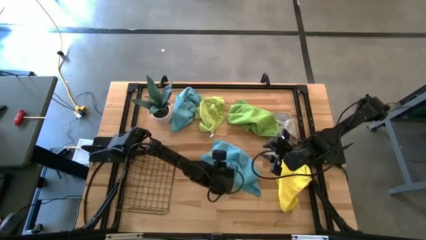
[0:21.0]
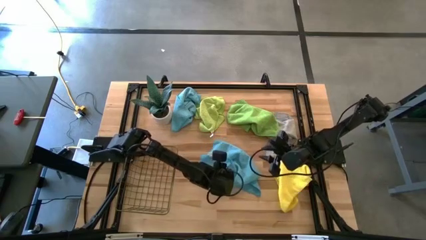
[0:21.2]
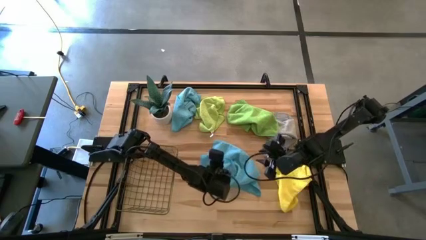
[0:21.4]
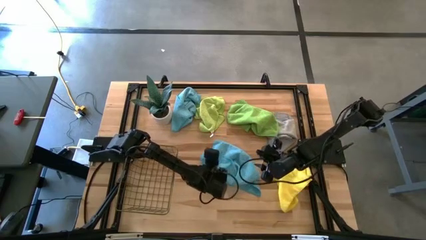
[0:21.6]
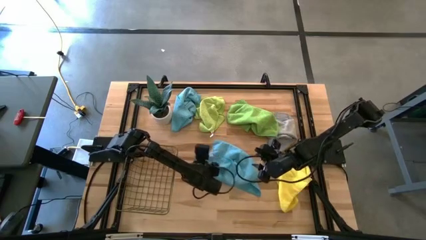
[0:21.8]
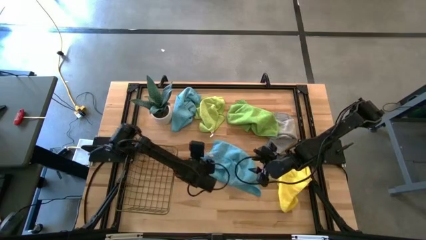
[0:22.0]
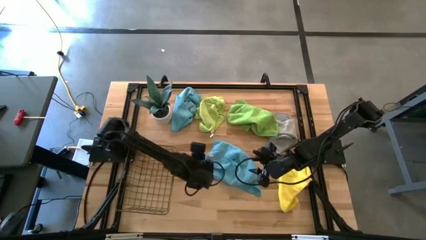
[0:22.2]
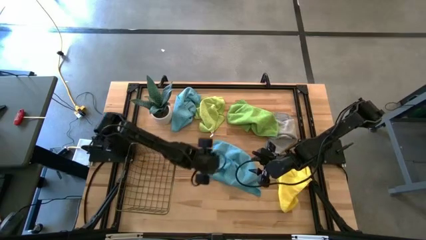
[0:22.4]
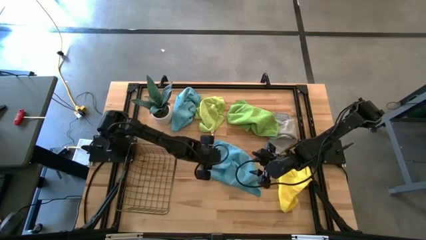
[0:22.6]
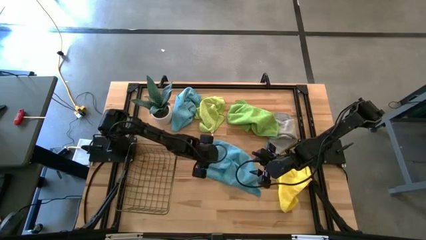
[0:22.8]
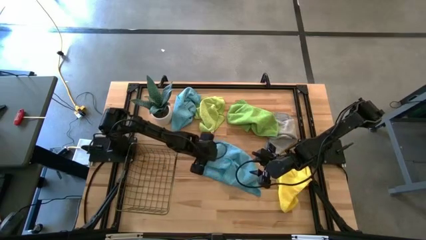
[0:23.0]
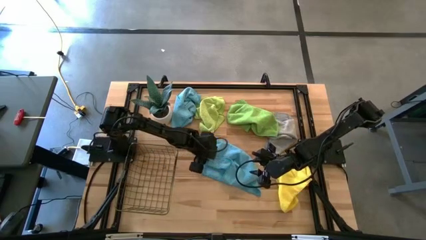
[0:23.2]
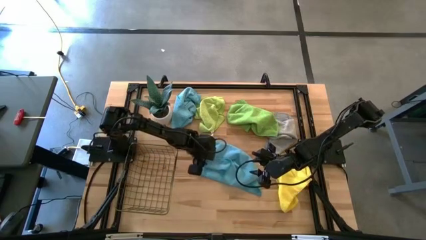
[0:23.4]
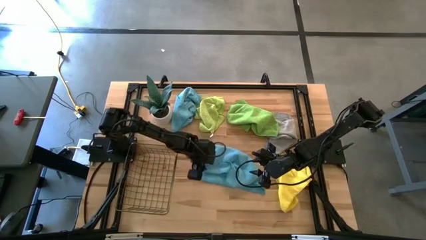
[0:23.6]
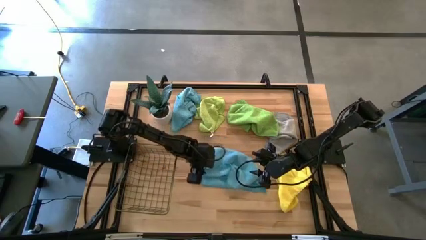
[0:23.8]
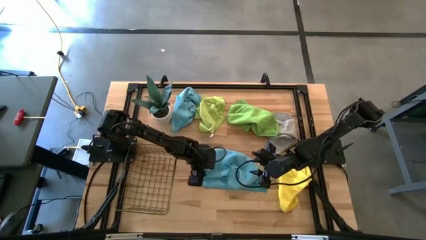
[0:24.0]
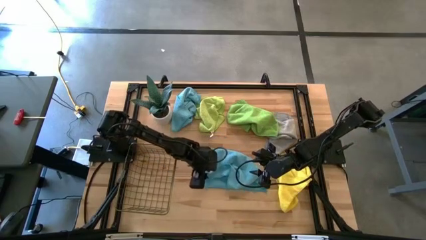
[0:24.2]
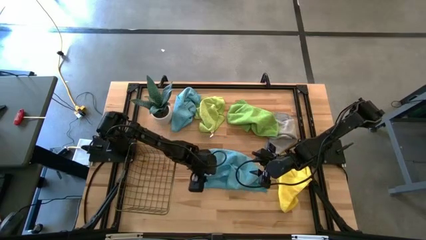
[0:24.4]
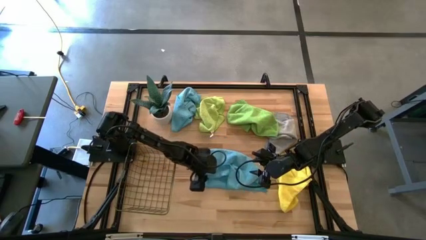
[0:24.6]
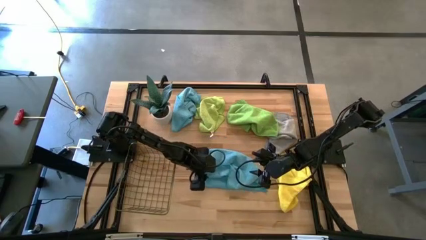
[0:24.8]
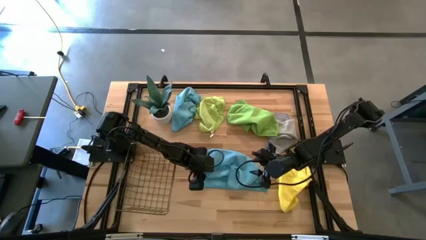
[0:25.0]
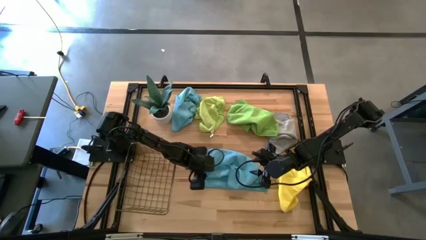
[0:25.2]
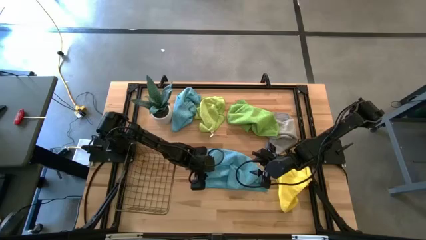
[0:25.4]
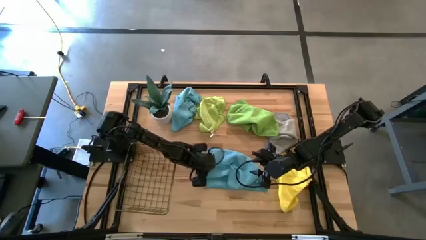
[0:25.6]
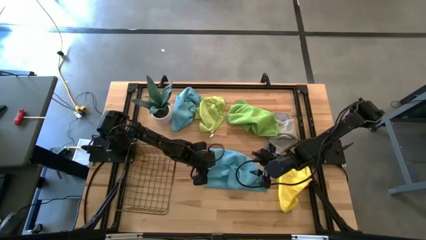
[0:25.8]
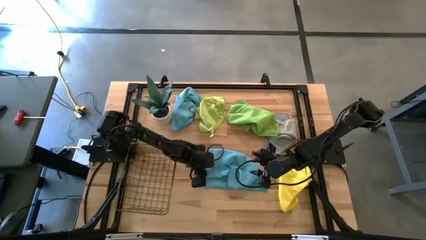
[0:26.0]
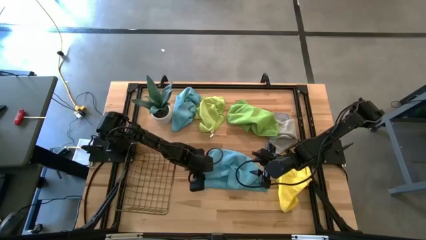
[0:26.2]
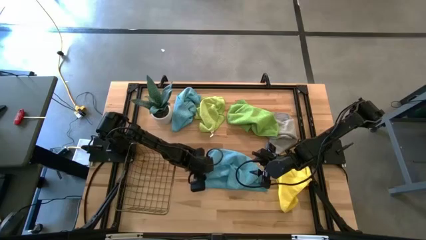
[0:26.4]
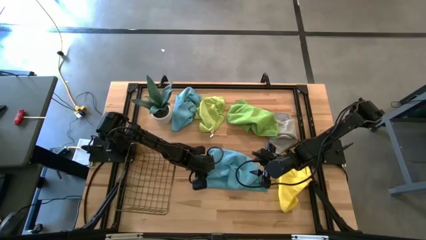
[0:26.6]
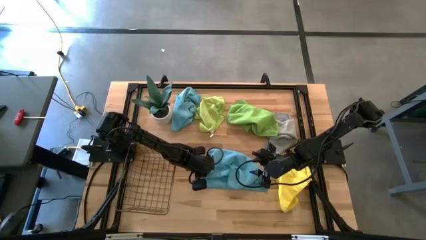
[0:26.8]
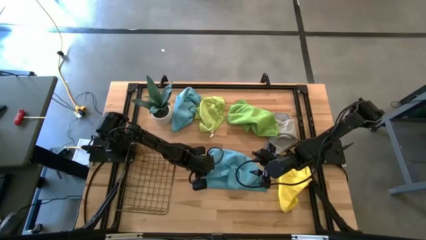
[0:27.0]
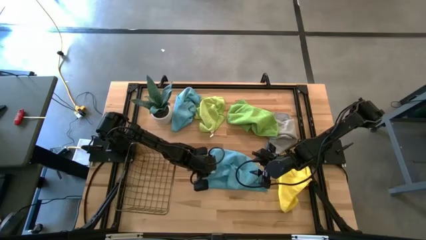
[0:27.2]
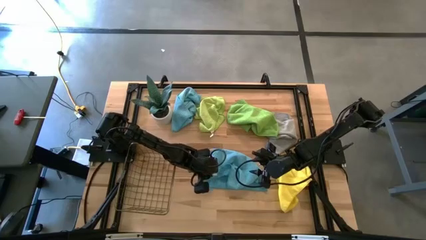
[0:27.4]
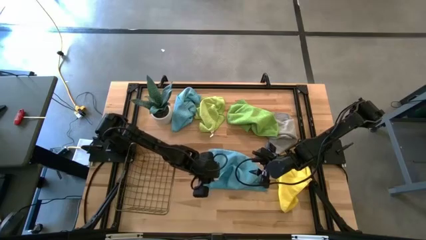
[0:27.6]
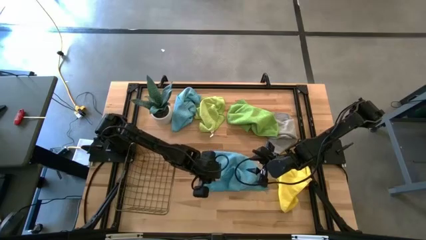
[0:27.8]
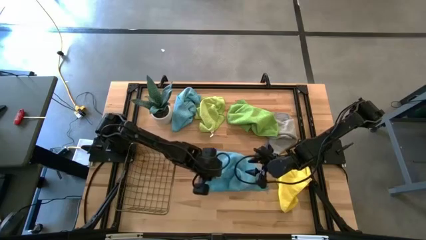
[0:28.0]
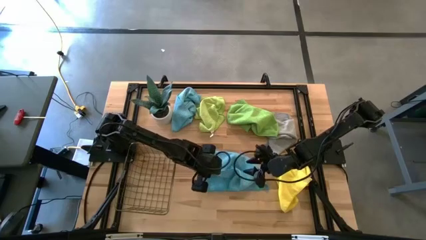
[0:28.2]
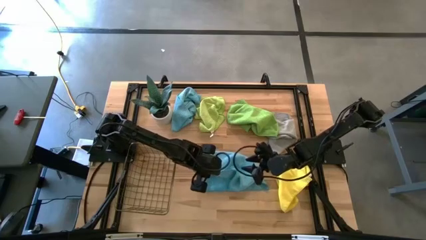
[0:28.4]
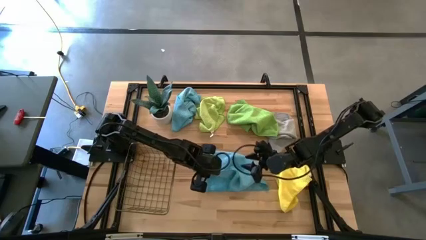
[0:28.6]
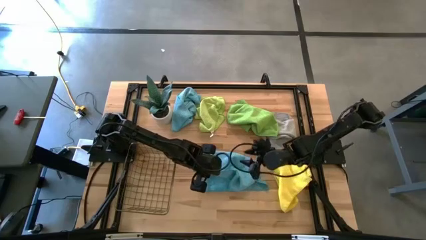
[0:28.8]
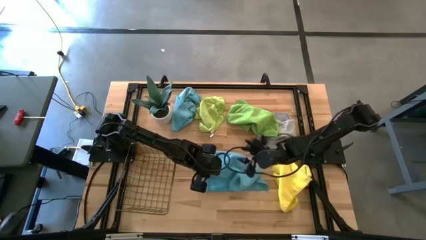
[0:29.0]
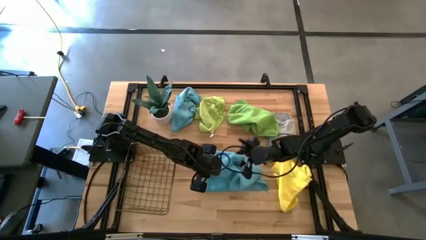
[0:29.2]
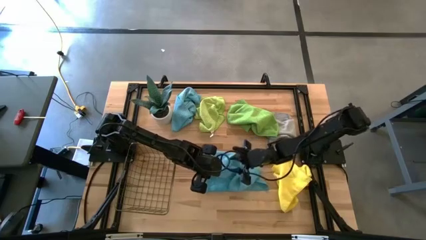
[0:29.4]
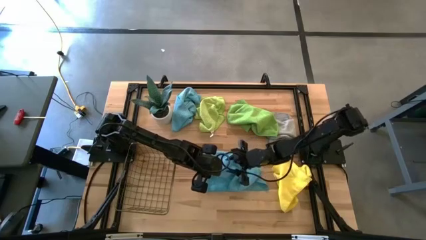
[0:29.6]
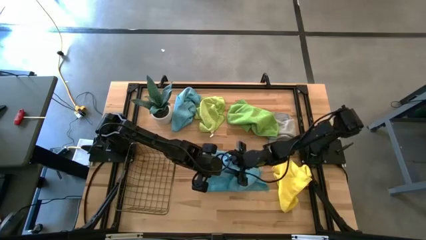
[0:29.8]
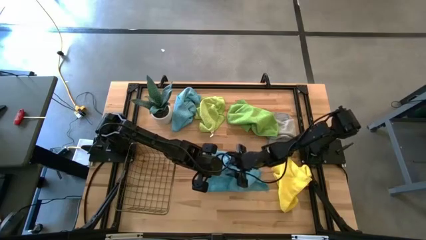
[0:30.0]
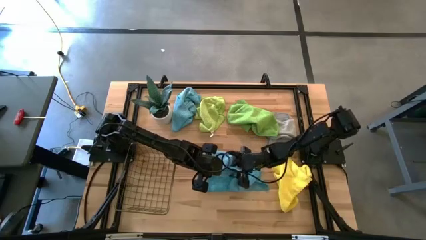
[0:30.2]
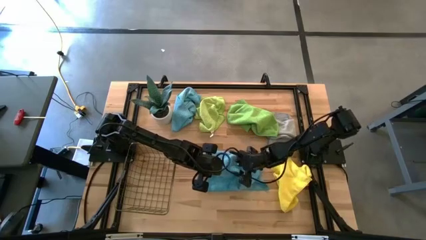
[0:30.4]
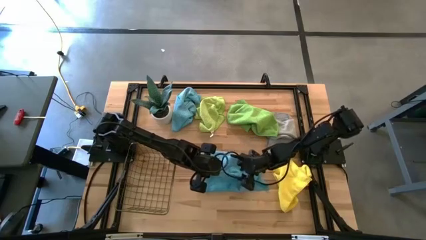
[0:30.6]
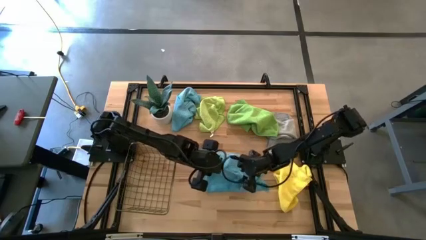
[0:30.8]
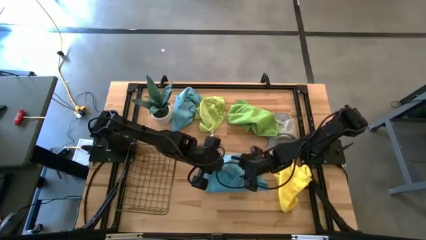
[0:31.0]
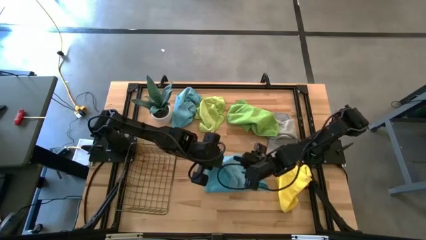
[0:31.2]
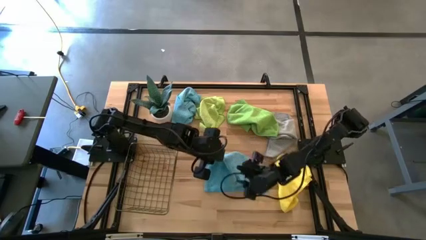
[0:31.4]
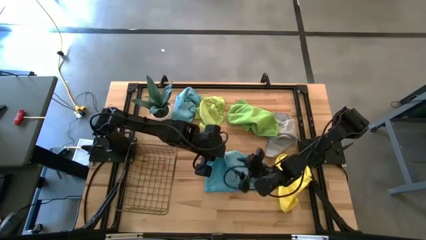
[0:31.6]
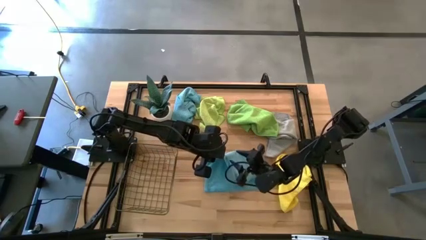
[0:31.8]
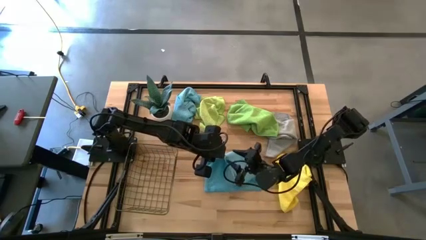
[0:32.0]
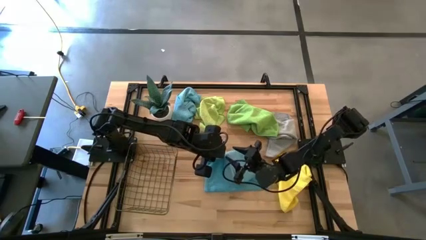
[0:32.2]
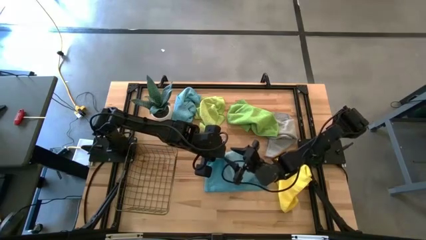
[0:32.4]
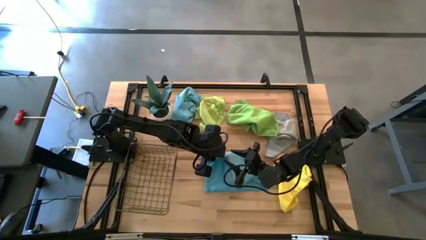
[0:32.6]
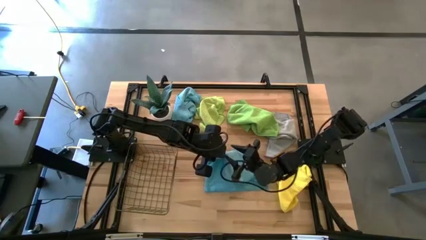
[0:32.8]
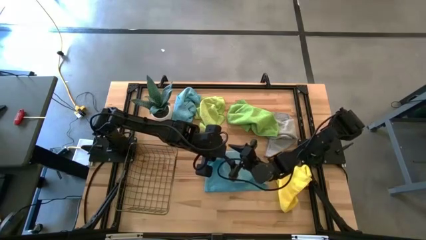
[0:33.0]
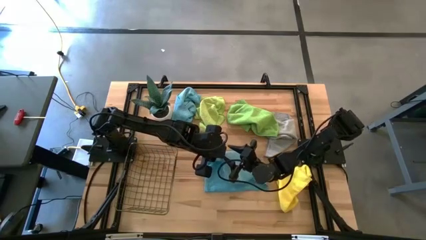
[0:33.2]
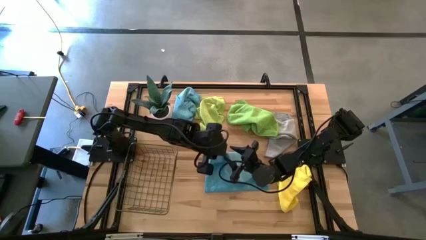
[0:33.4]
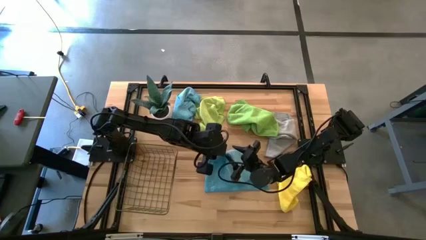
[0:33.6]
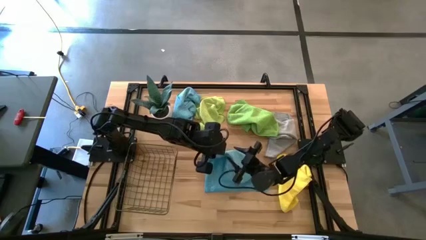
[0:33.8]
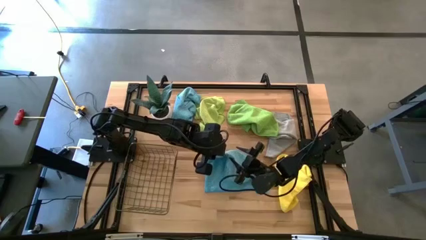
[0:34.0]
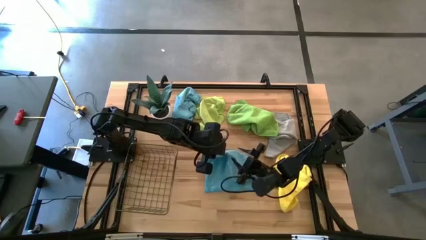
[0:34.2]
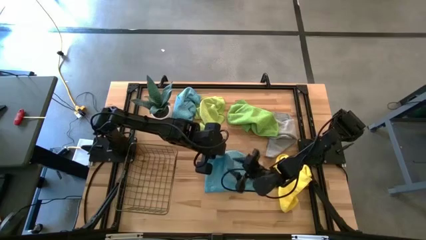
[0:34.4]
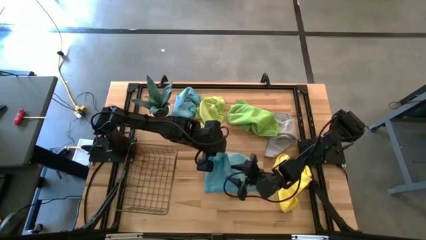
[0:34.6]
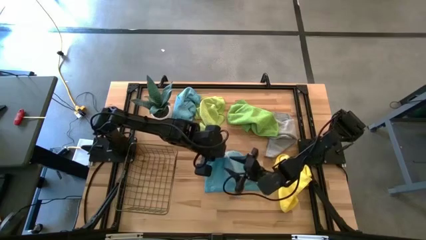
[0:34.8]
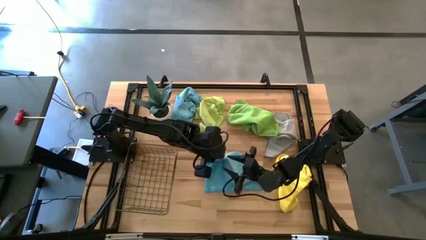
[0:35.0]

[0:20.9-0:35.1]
Task: Fold microfiber towels
Fold the bottom blue microfiber towel
